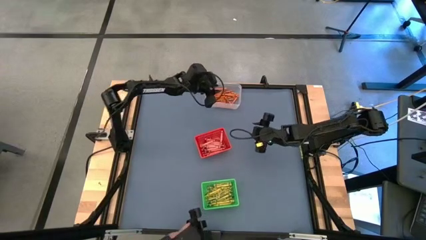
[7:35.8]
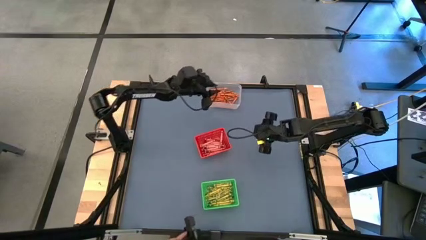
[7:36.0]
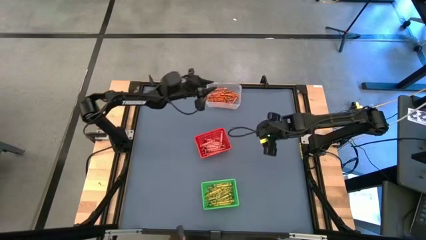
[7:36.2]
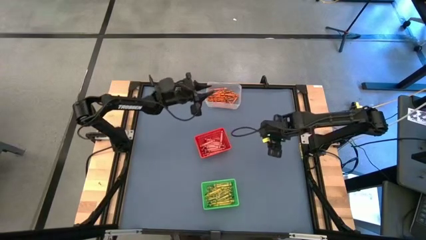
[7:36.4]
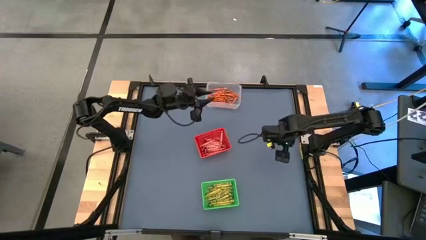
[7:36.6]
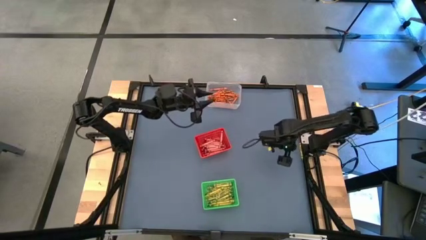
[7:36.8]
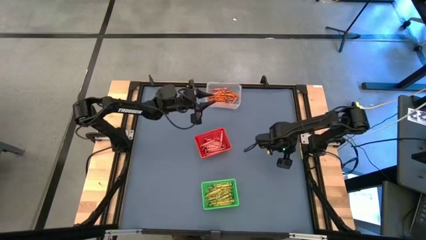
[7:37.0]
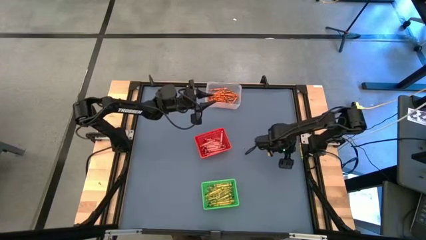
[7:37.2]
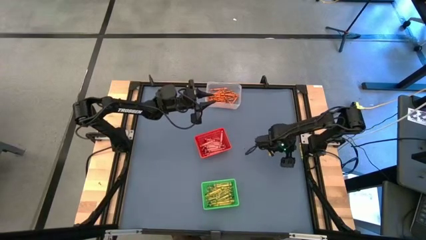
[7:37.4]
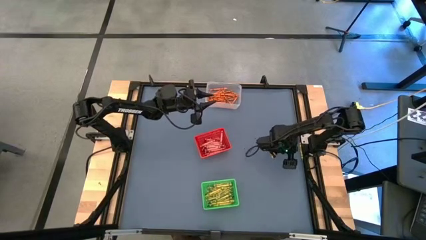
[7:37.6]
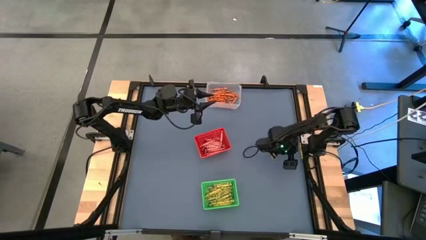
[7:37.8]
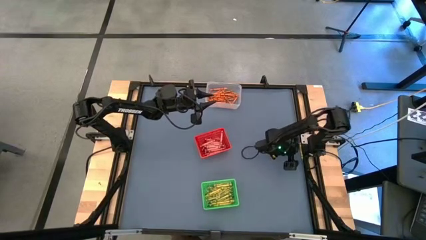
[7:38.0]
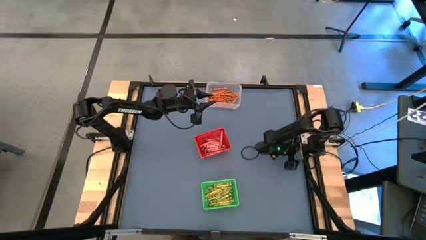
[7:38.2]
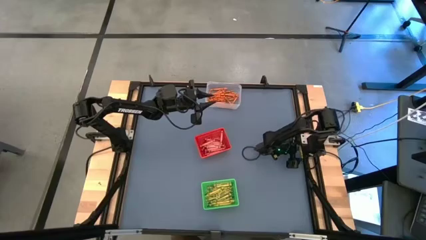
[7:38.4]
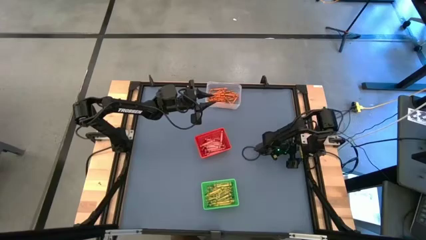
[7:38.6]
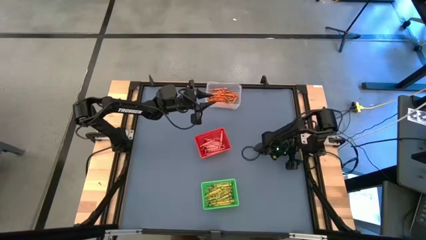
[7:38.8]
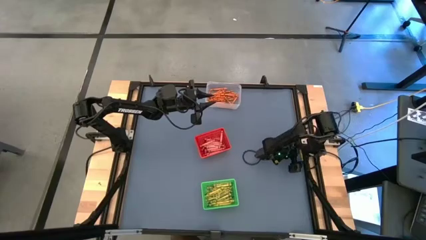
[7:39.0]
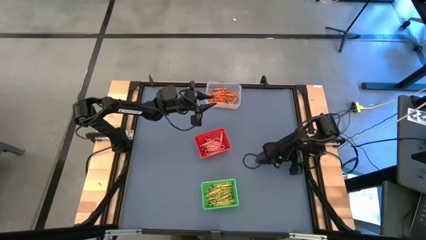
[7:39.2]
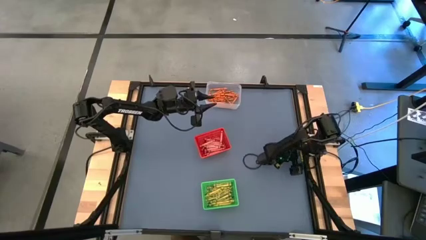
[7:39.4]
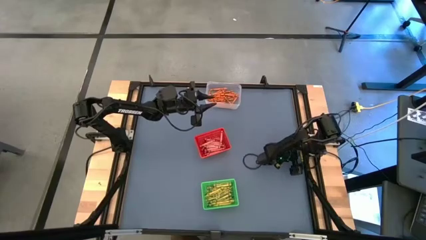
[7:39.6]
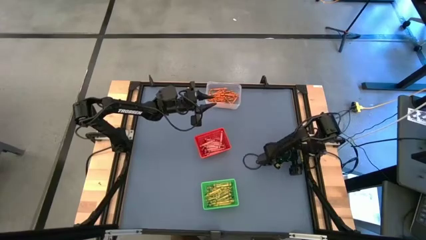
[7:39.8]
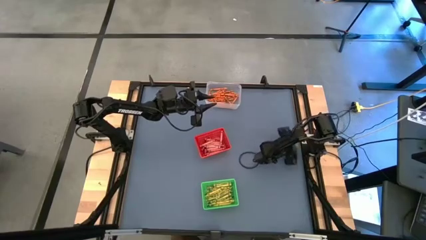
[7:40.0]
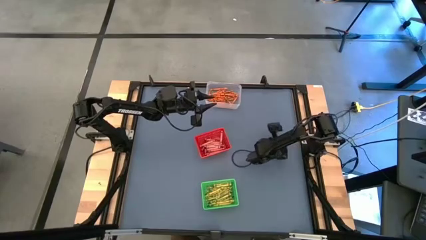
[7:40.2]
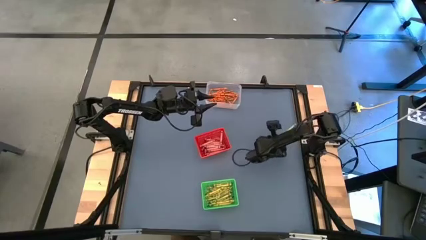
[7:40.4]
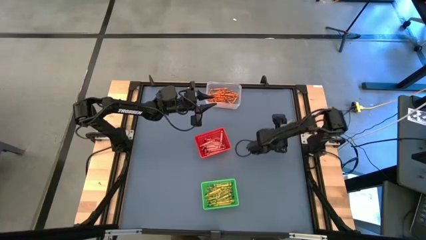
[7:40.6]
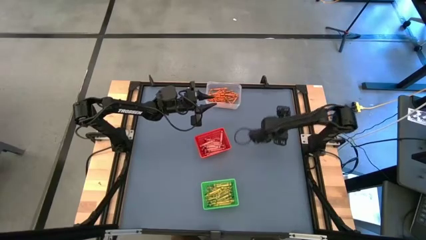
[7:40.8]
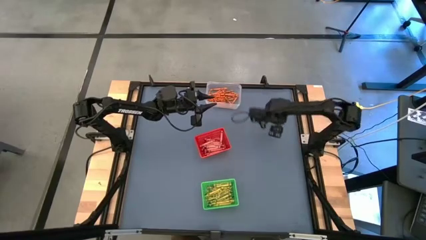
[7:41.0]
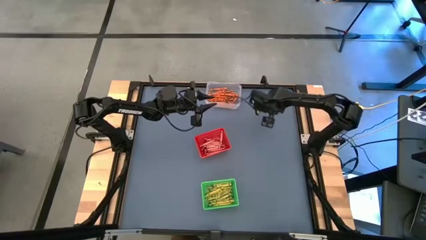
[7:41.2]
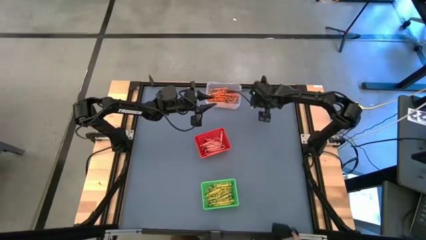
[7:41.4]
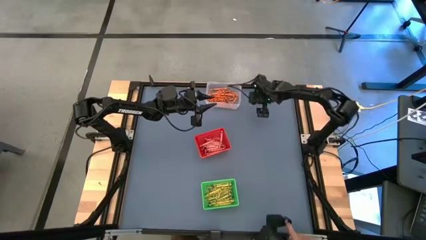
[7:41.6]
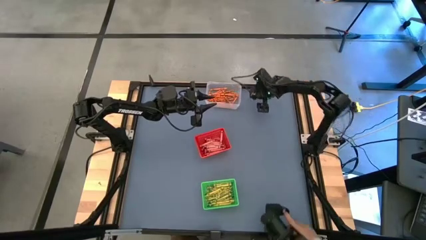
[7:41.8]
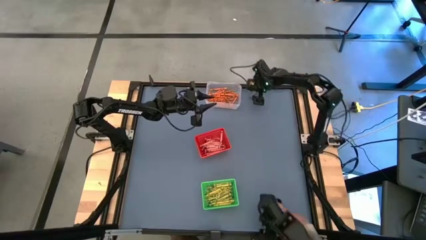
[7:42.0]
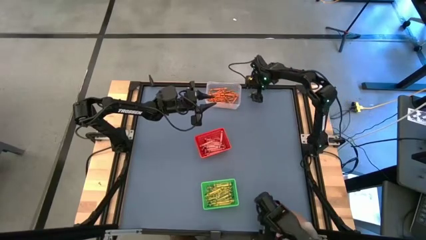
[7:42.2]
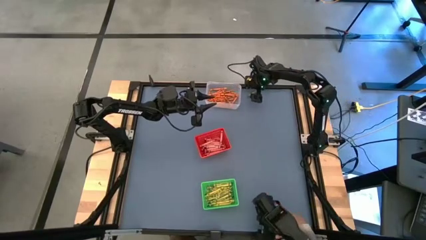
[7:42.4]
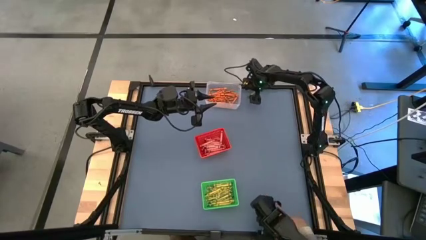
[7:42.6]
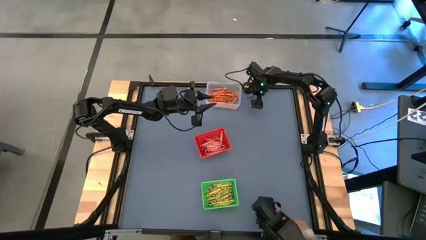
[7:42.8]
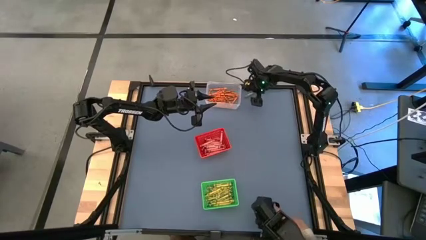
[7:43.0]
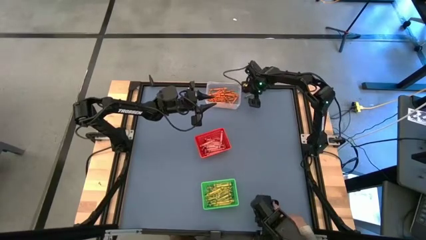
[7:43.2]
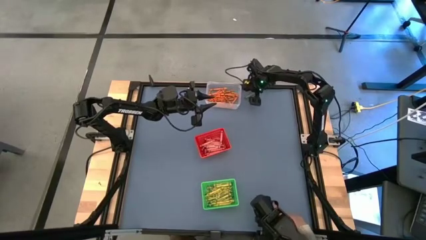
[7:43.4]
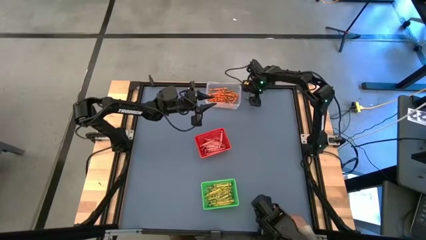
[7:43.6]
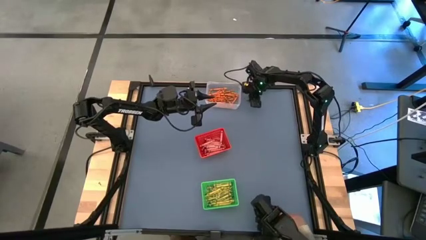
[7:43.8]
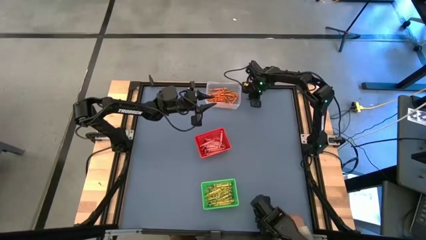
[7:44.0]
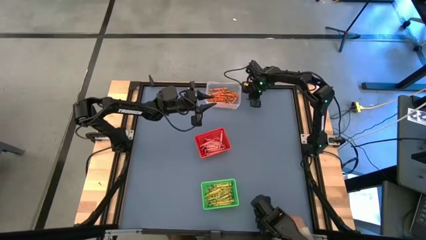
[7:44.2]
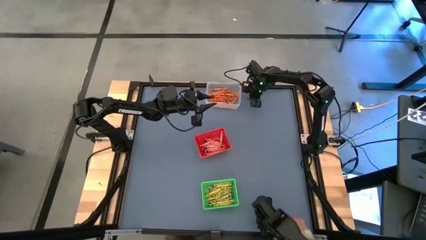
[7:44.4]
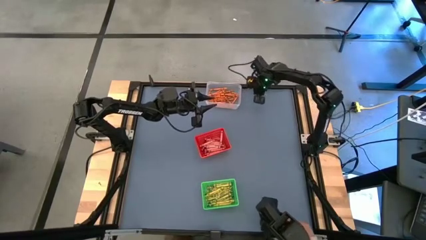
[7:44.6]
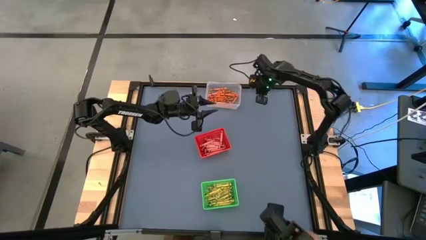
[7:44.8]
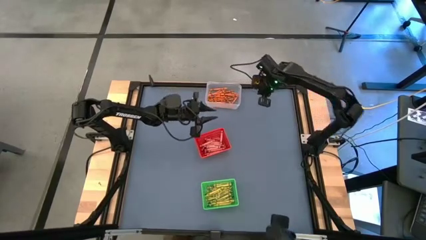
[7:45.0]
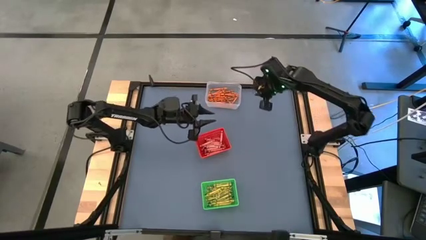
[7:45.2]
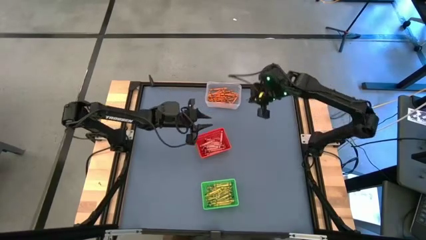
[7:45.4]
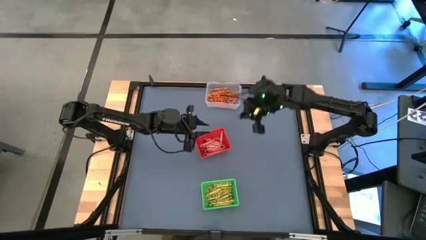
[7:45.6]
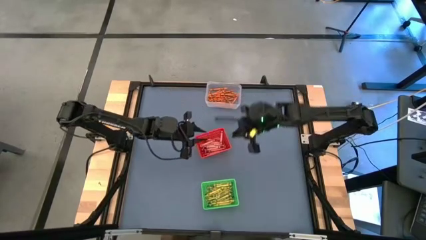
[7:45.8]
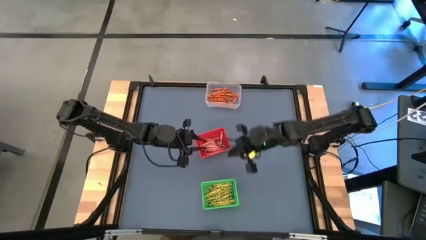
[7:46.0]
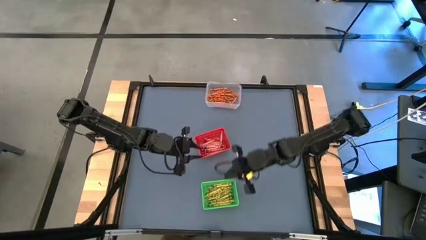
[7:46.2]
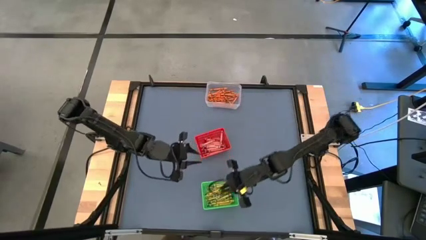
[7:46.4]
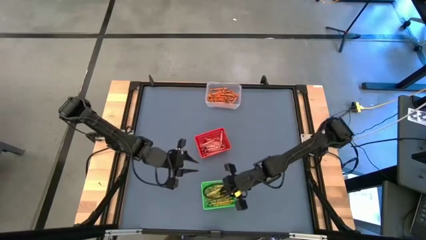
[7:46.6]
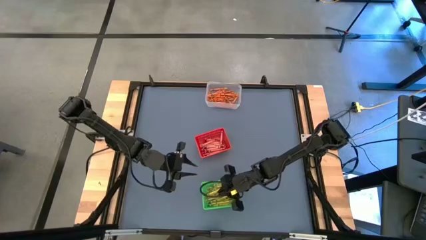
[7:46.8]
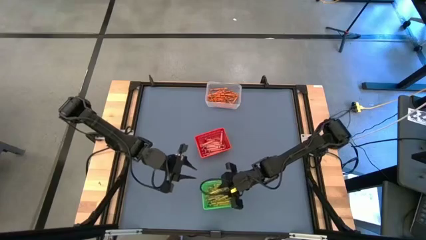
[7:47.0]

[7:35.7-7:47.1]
Task: Sort crayons
Put the green crayon into the green bin

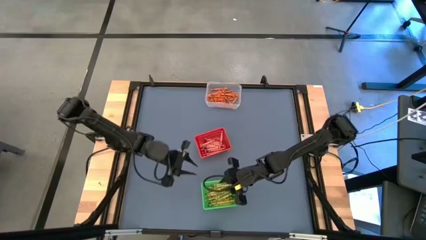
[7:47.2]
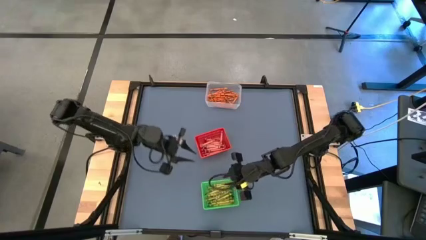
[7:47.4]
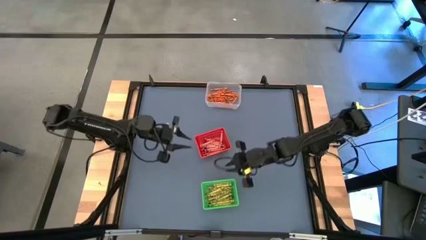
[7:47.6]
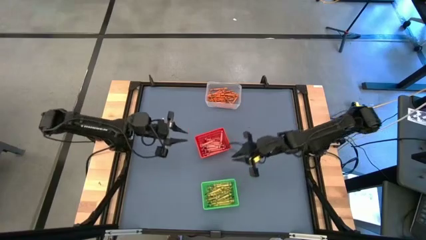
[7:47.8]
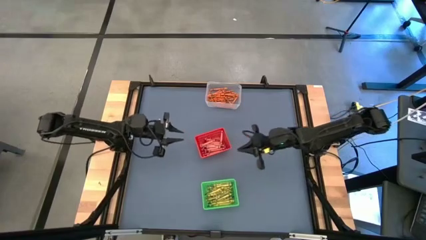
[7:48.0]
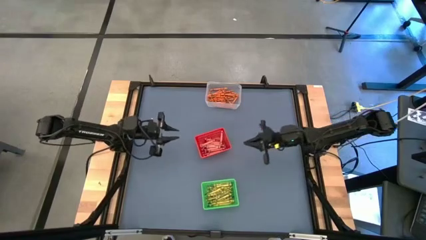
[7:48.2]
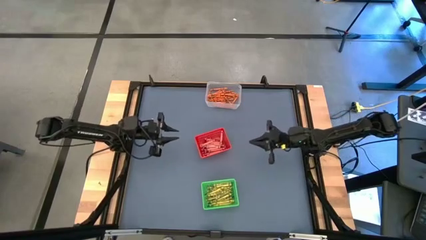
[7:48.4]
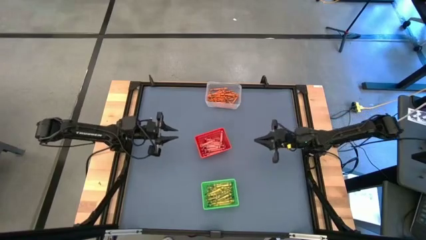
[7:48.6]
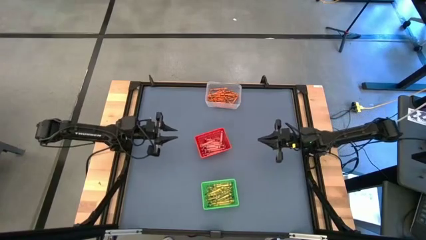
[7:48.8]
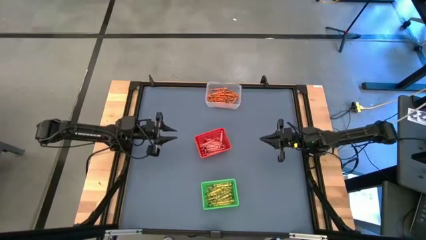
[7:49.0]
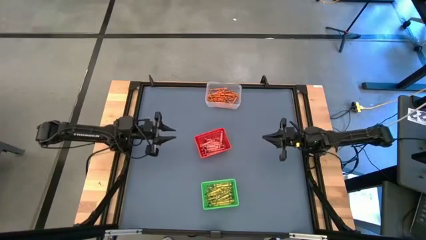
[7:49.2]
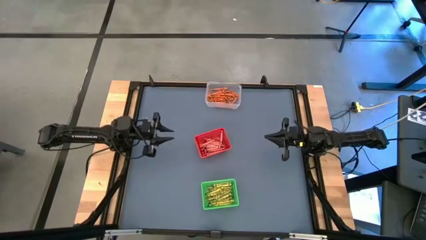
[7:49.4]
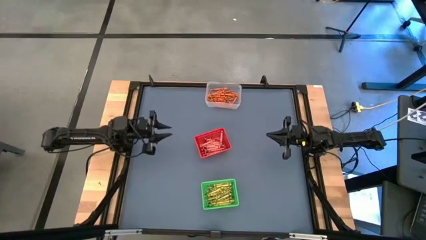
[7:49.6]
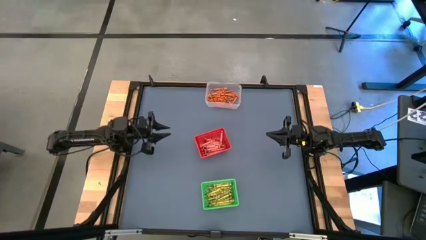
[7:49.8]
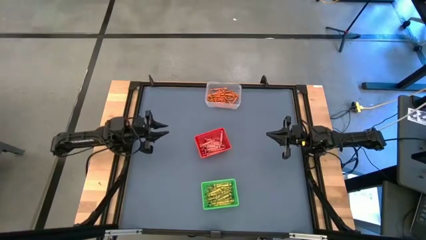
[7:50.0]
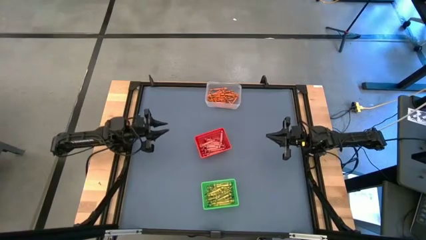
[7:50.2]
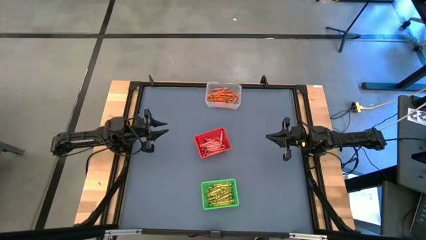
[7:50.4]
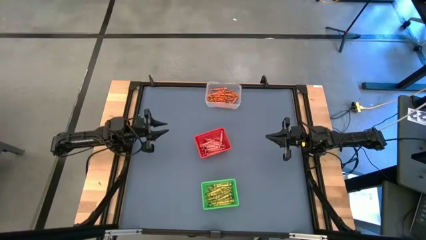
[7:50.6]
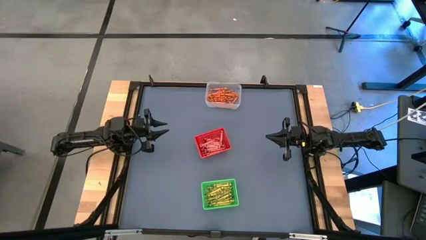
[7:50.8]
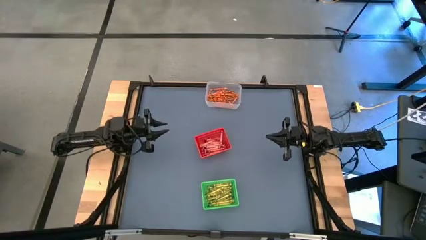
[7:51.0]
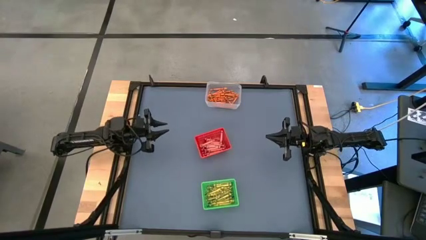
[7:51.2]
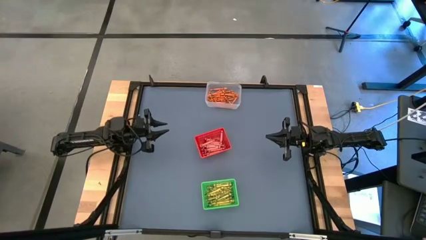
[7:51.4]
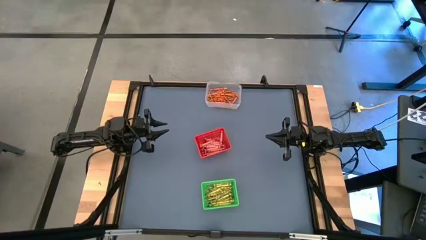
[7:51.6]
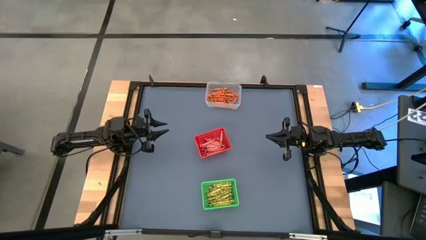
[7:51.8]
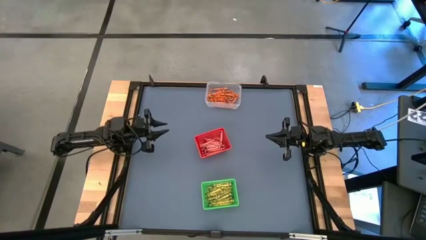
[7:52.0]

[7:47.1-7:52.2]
Return to Home Position
